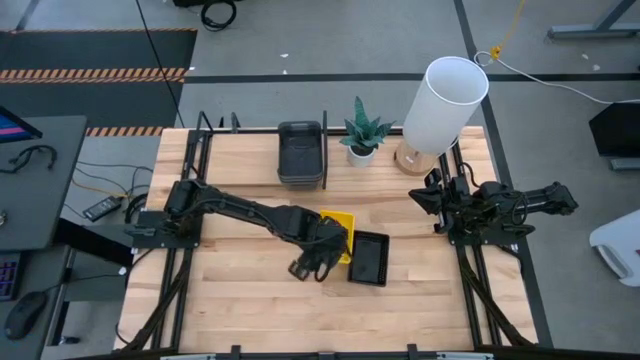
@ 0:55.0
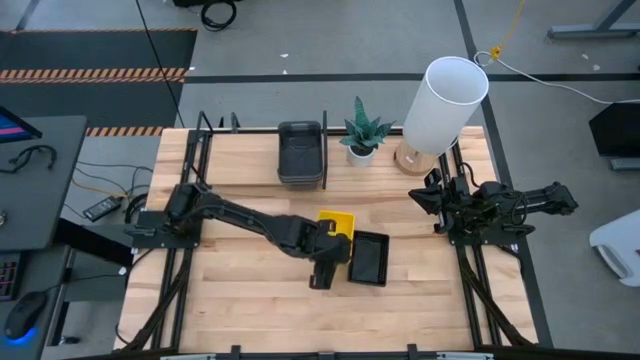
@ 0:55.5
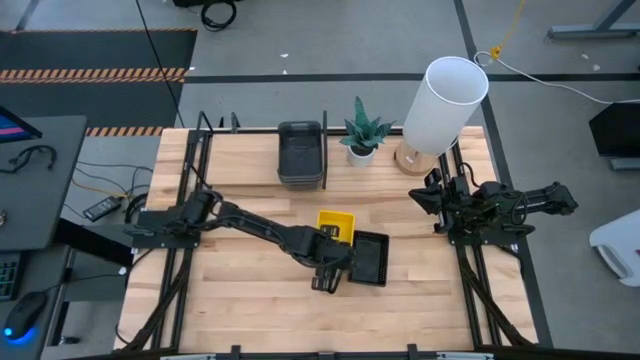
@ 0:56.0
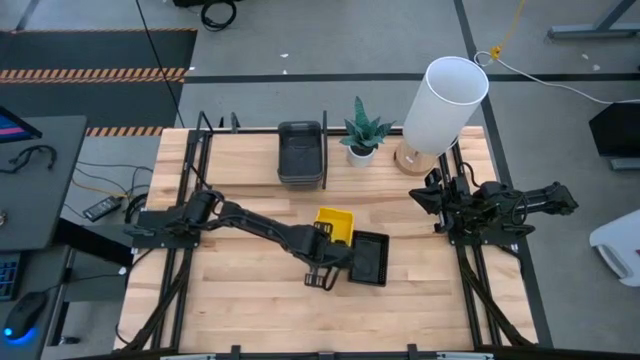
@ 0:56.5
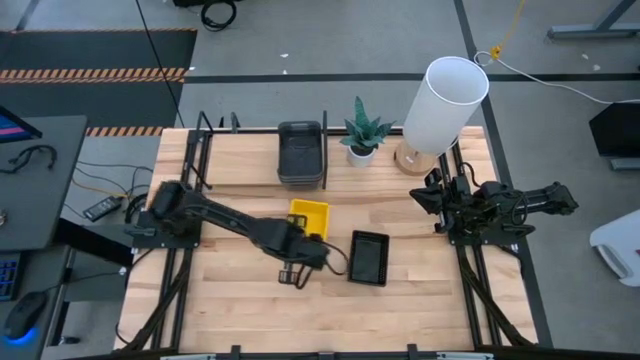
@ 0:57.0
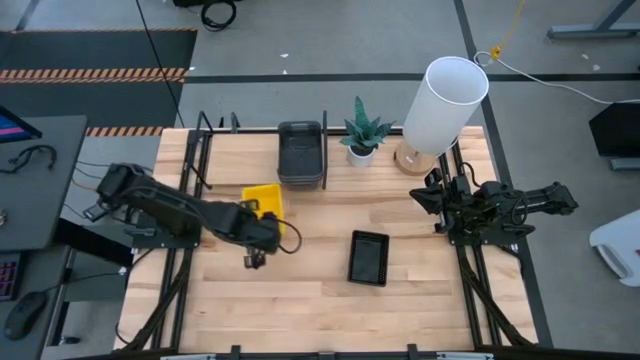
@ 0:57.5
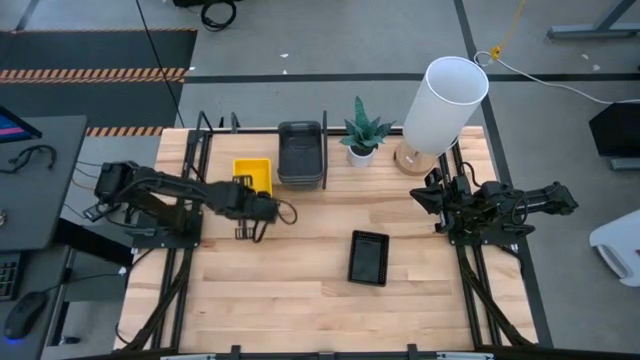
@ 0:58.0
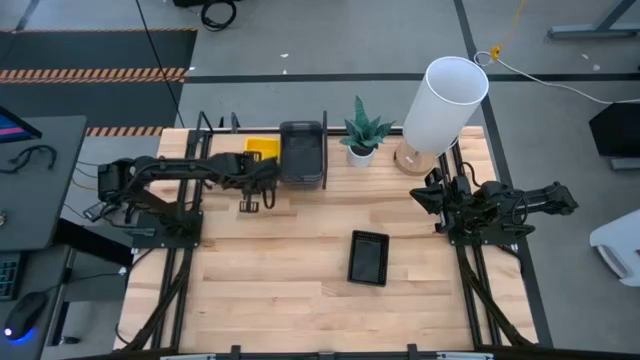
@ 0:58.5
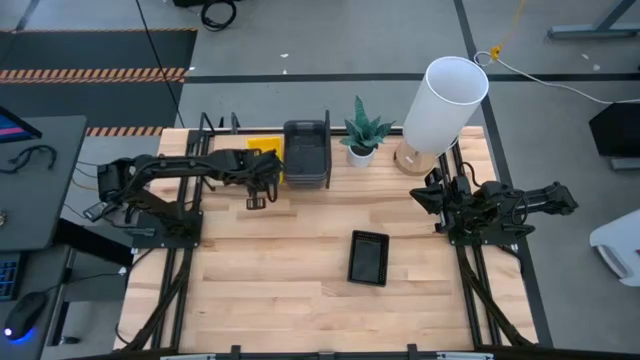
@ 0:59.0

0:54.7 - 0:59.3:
Task: Stack baskets on shelf by color
Put the stacked yellow bins on the shelf

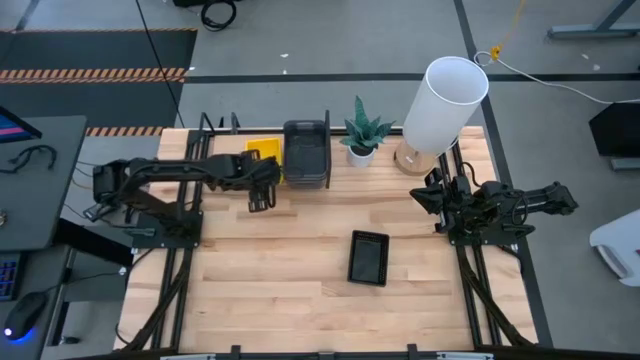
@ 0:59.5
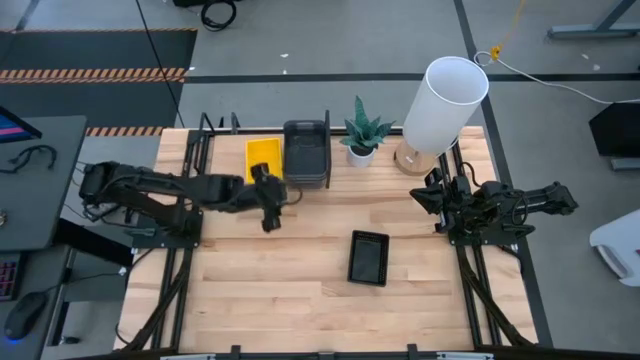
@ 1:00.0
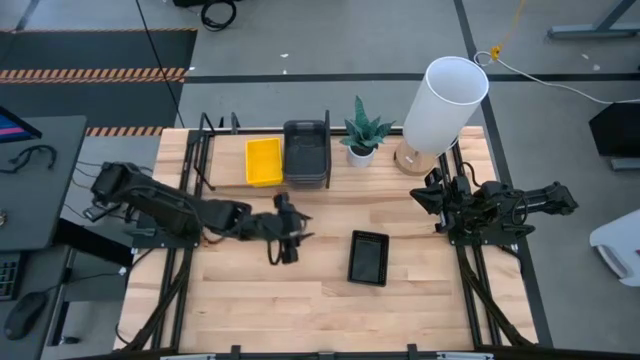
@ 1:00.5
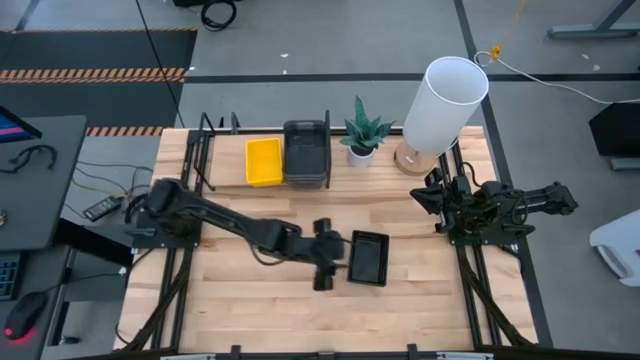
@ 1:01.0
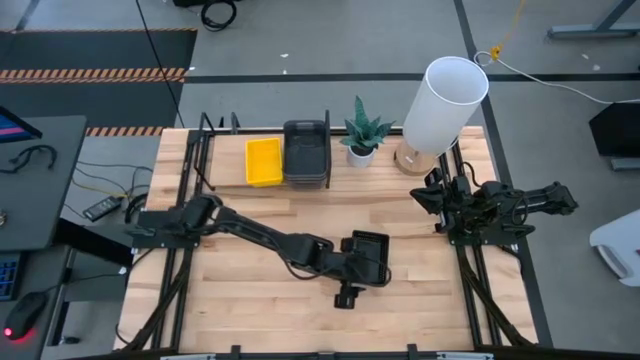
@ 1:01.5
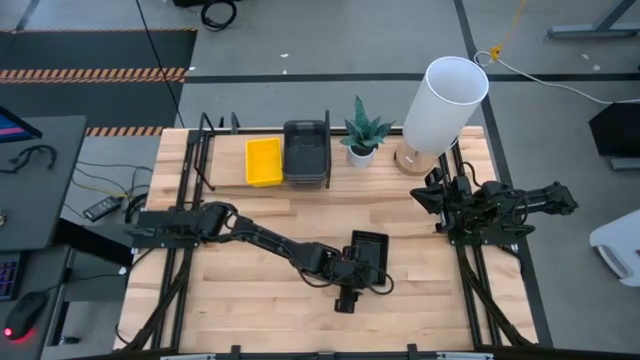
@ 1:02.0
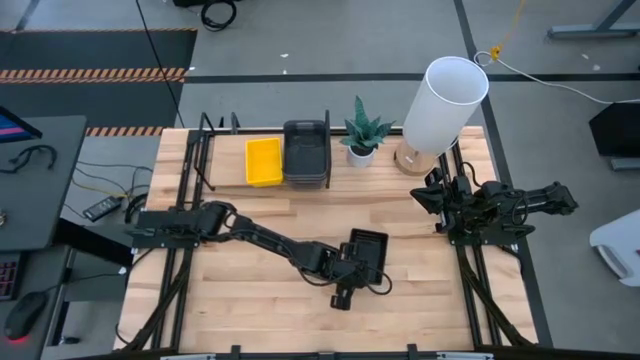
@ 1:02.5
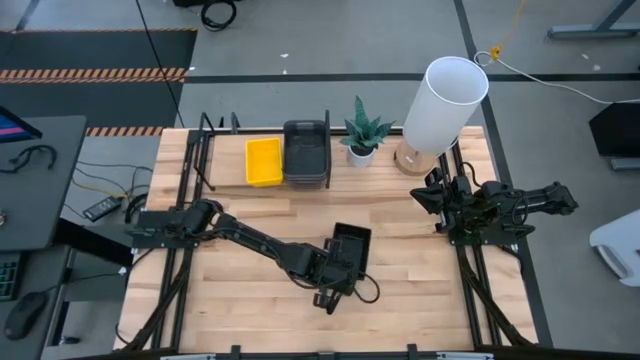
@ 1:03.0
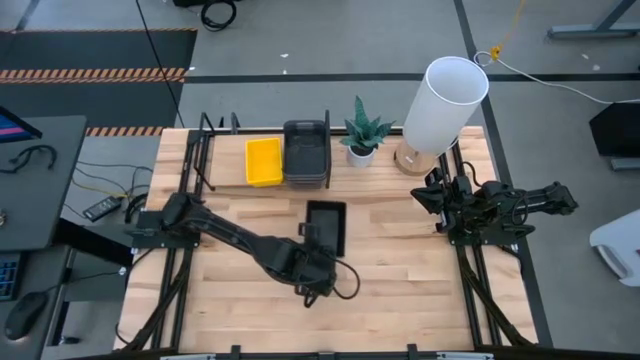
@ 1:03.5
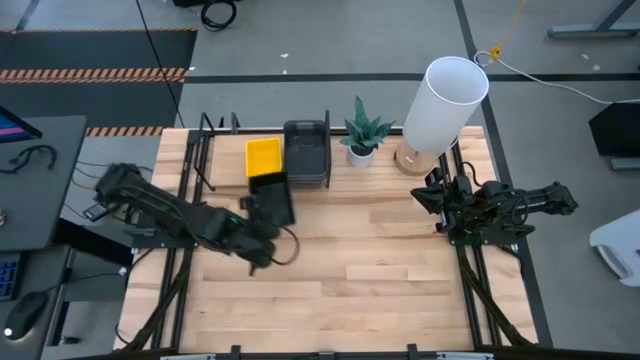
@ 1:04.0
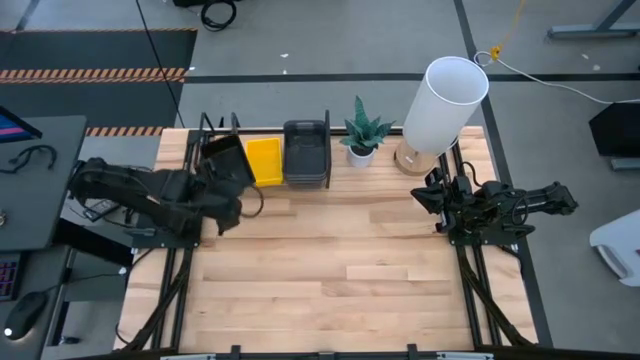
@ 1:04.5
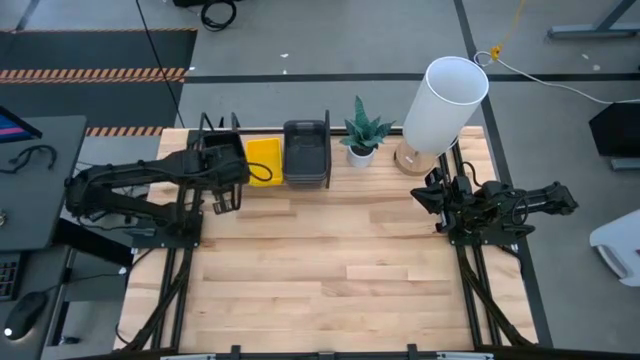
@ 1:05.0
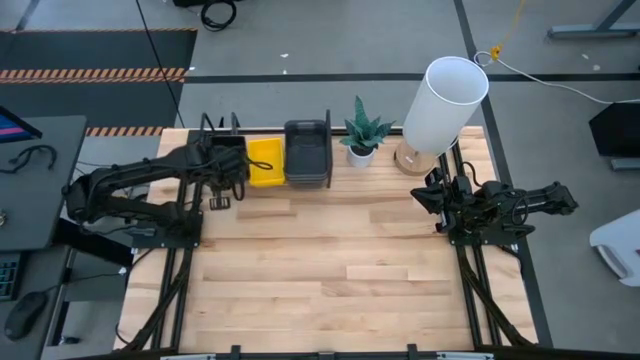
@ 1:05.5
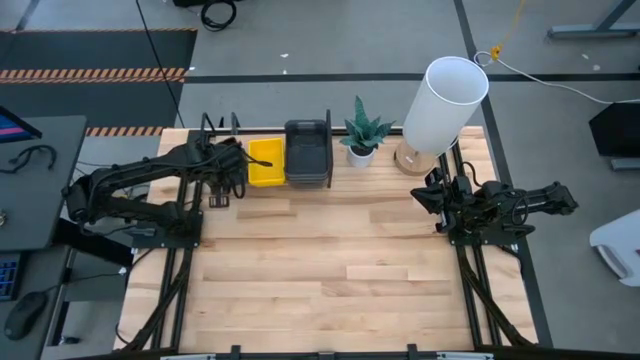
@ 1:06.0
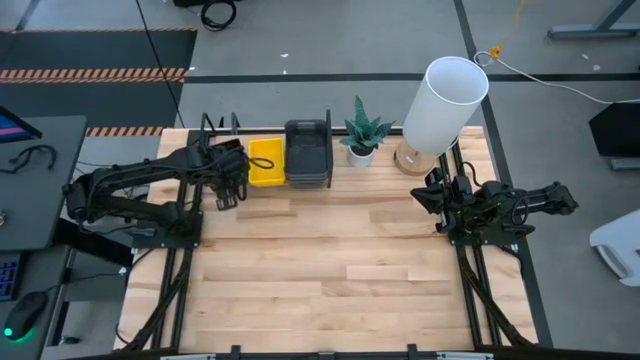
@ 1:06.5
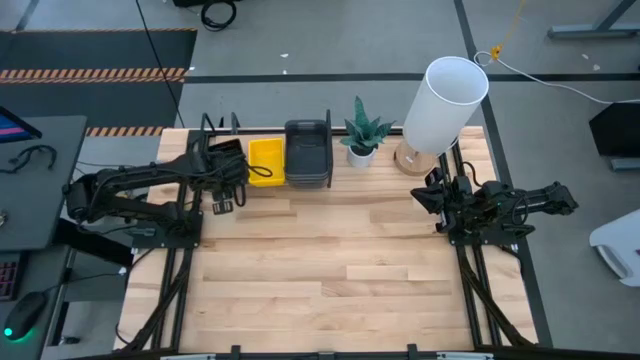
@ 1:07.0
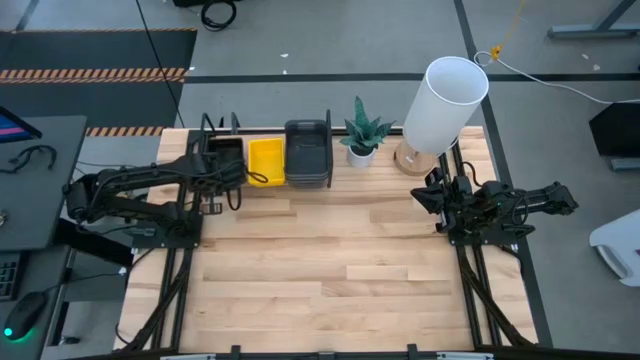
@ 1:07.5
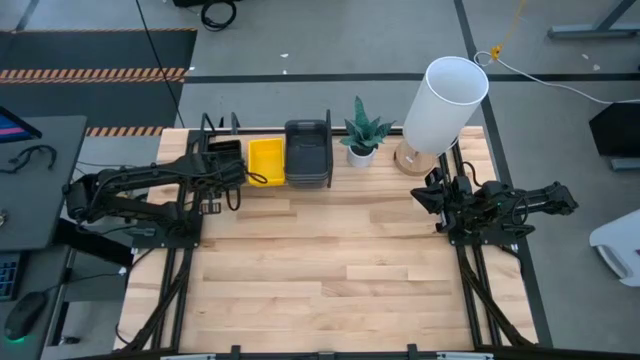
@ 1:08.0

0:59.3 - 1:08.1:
Put the stacked black bins on the shelf

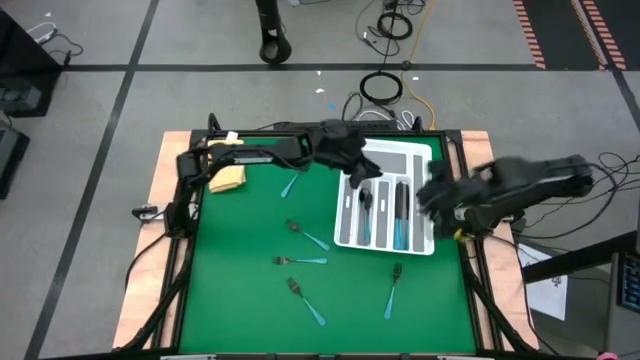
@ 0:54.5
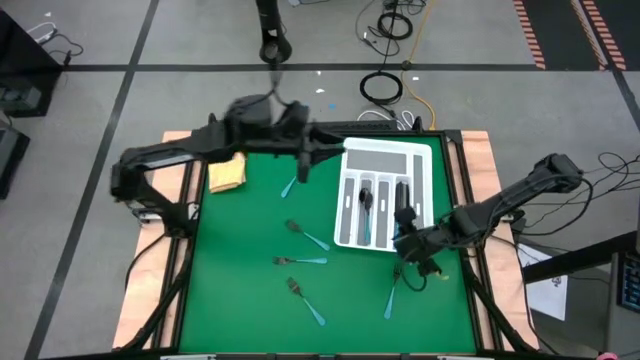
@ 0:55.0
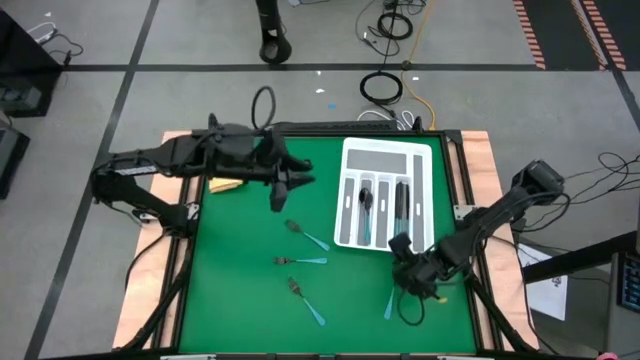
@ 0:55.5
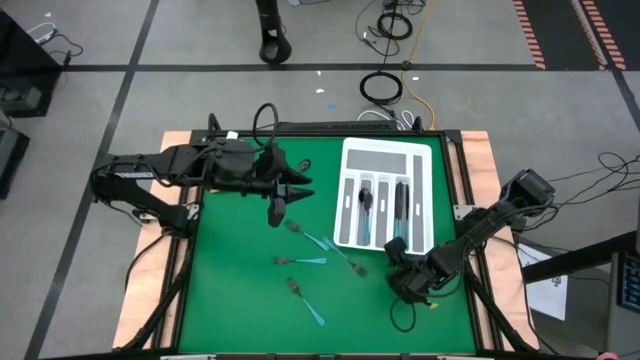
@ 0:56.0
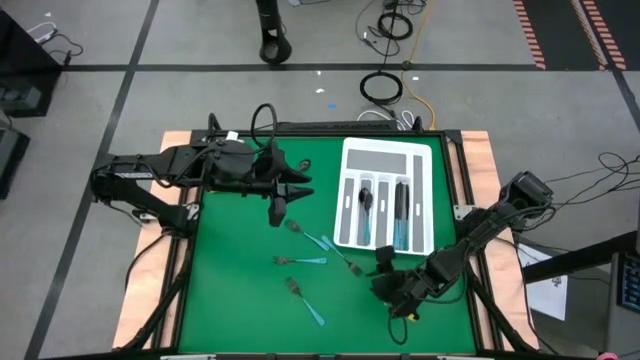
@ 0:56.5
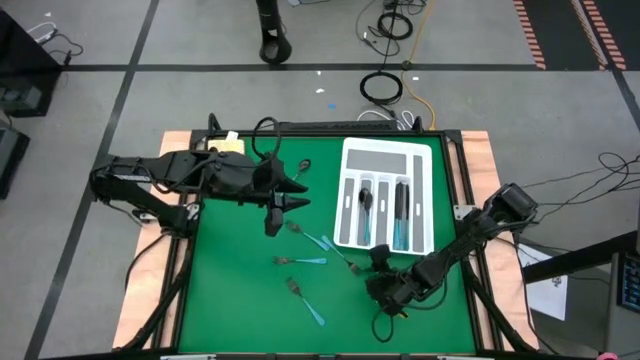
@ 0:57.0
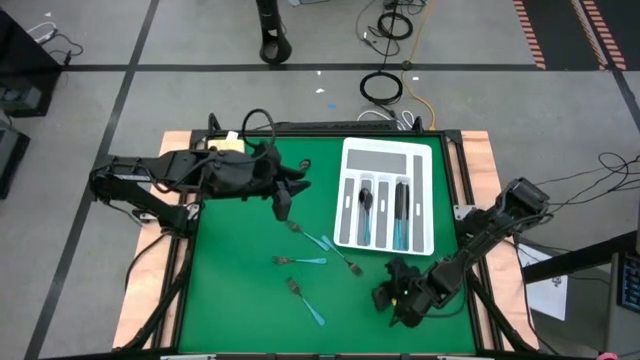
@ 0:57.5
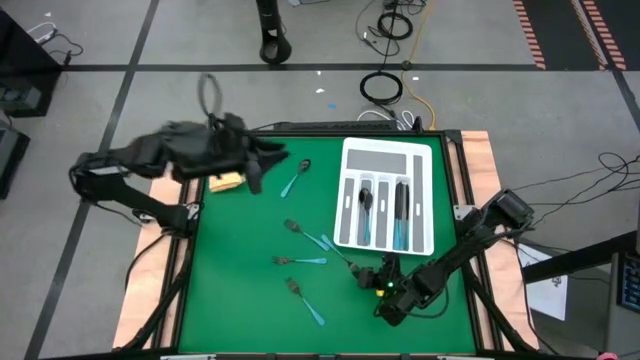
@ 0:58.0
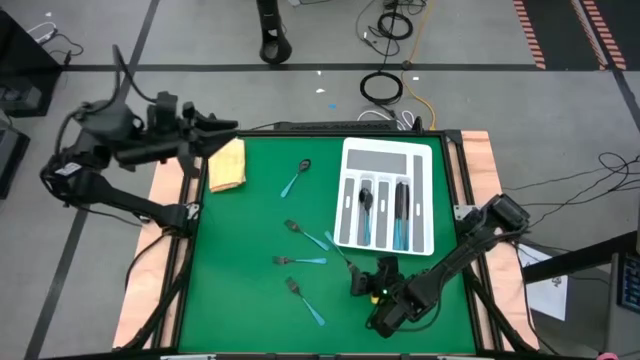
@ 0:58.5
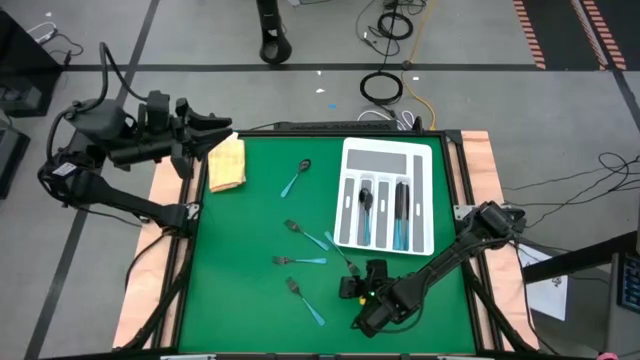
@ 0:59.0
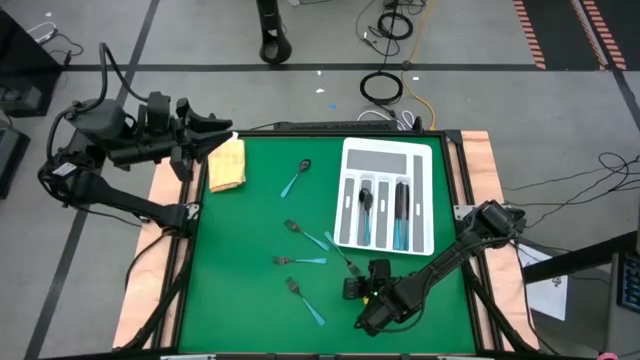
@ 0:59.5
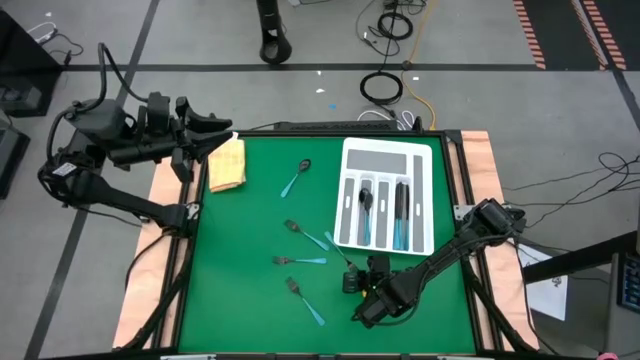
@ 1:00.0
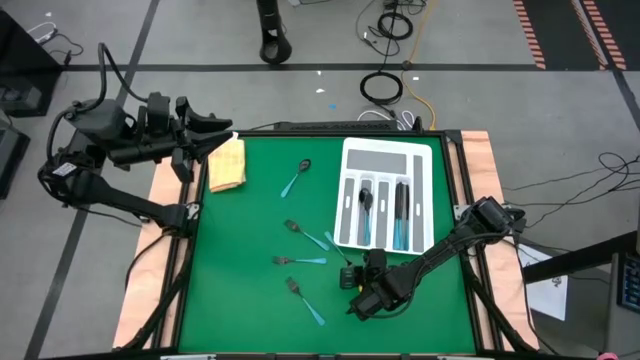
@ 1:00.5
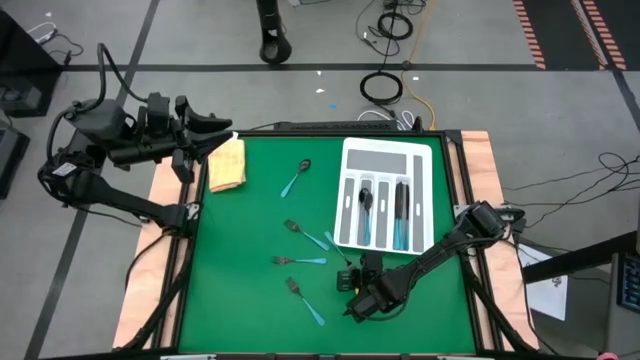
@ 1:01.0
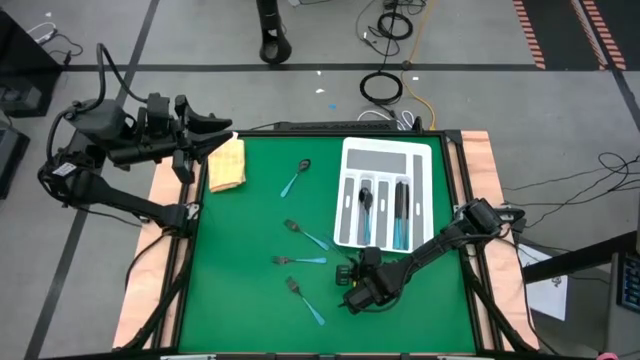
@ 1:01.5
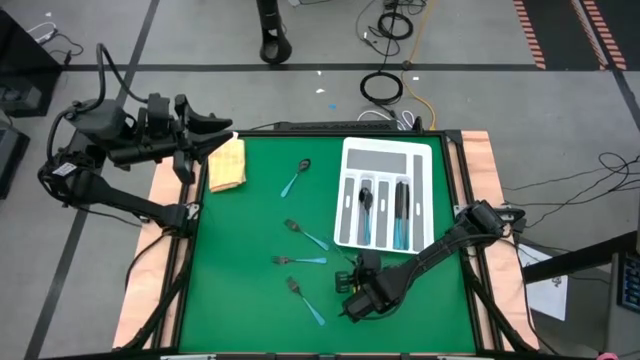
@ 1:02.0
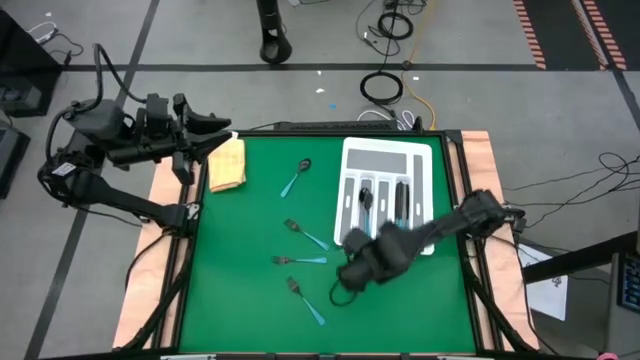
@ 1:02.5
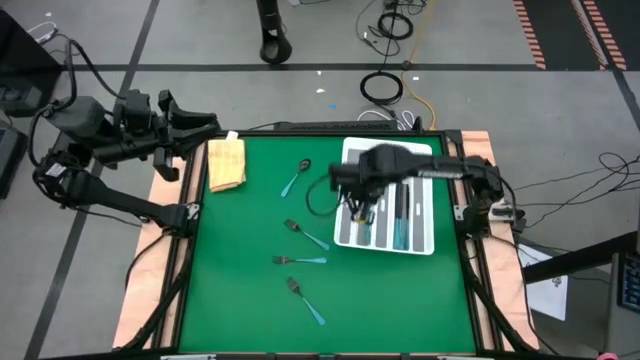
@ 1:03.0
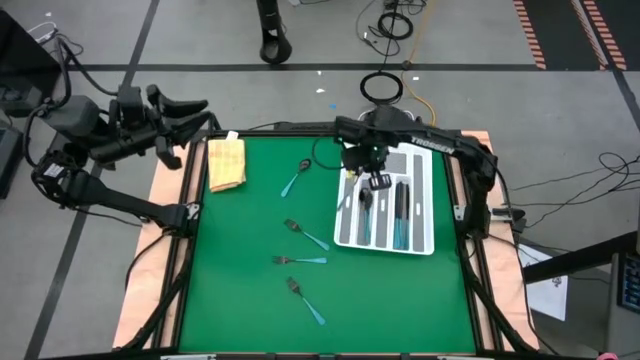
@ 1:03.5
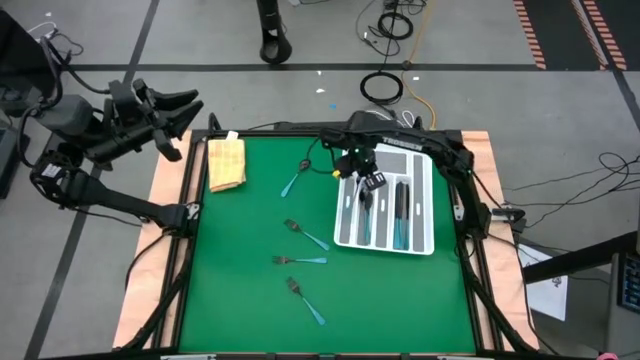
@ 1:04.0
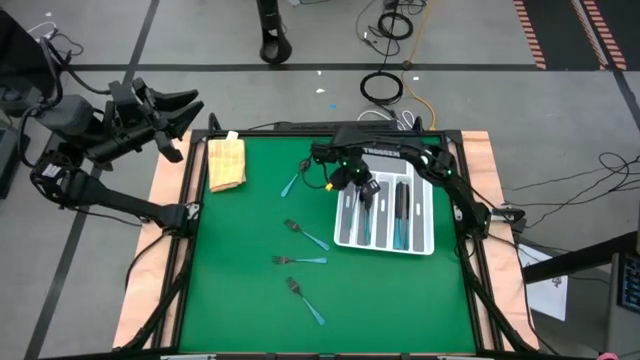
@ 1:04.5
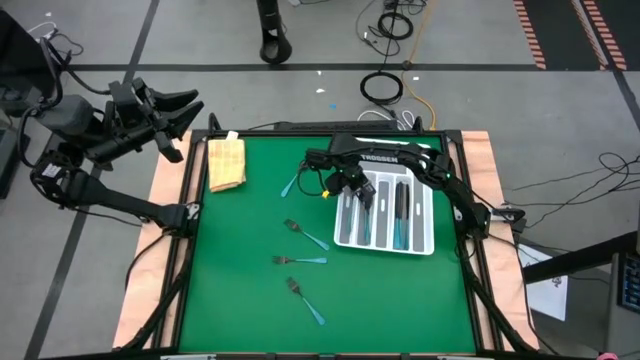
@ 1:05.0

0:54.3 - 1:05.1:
Task: Sort silverware
Put the blue fork into the silverware tray
